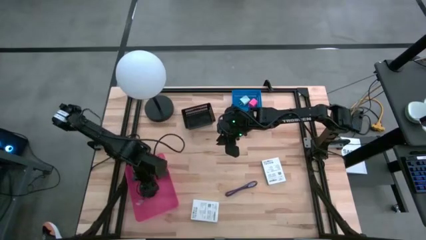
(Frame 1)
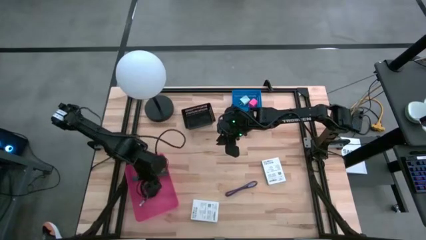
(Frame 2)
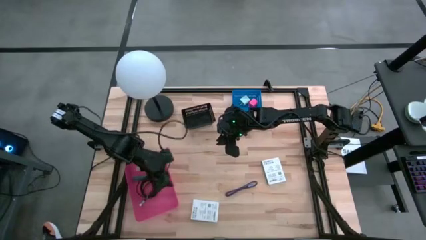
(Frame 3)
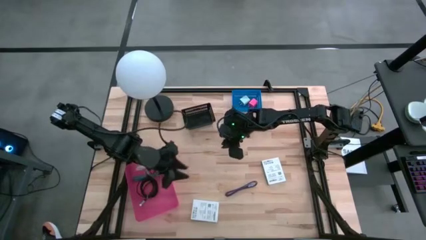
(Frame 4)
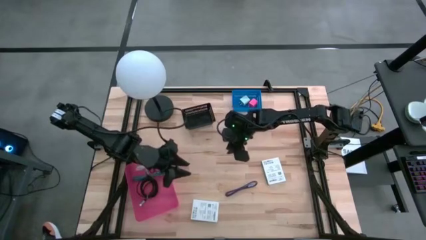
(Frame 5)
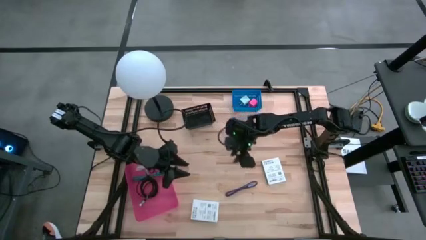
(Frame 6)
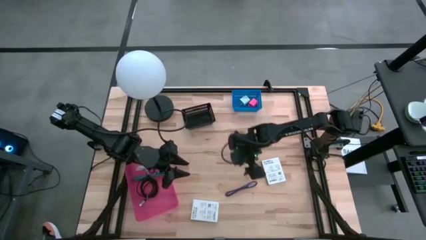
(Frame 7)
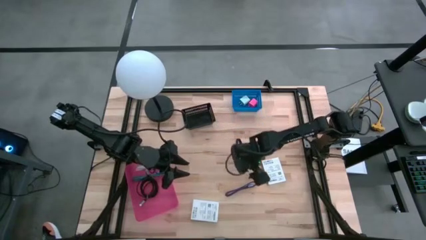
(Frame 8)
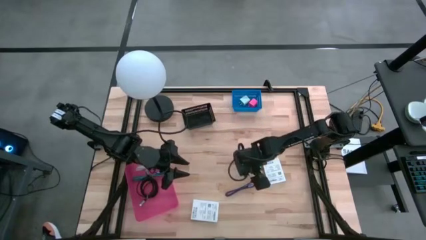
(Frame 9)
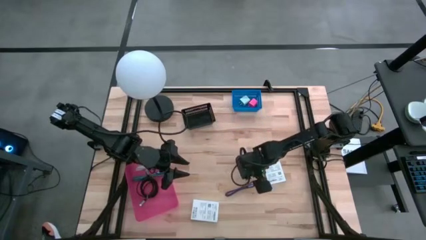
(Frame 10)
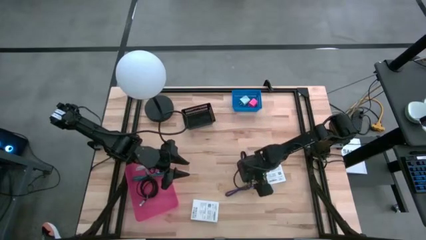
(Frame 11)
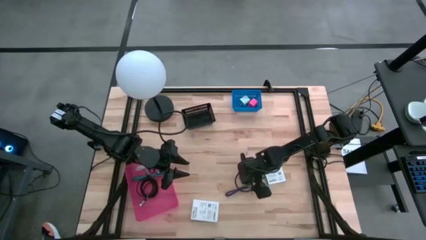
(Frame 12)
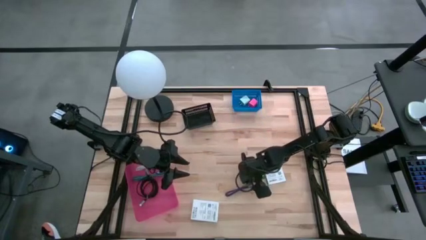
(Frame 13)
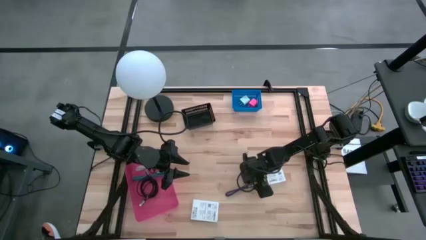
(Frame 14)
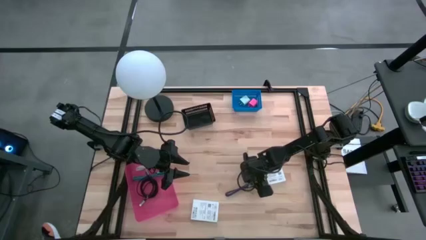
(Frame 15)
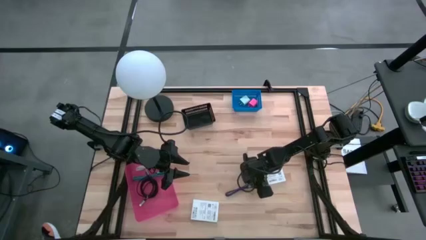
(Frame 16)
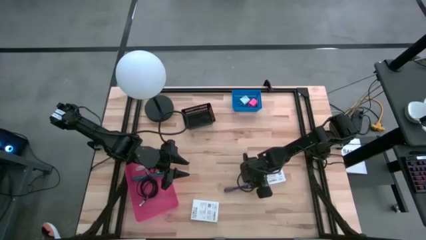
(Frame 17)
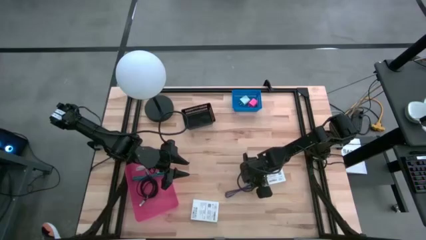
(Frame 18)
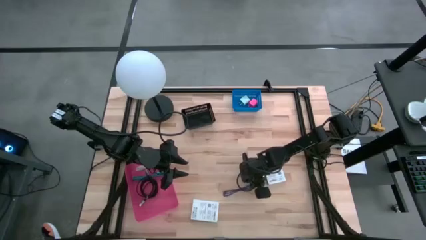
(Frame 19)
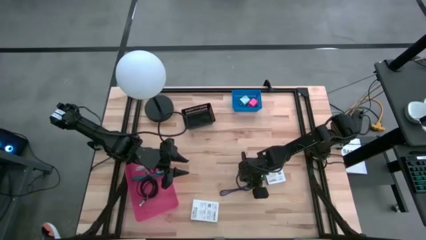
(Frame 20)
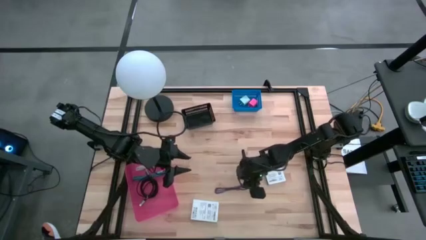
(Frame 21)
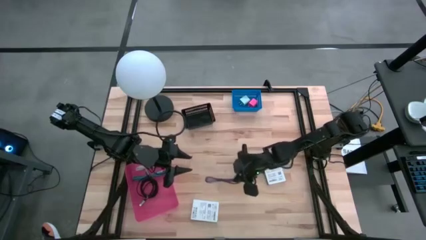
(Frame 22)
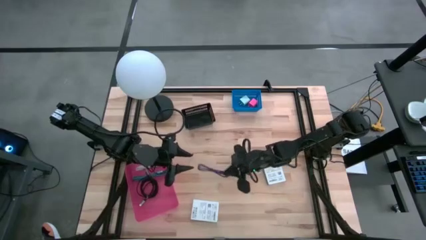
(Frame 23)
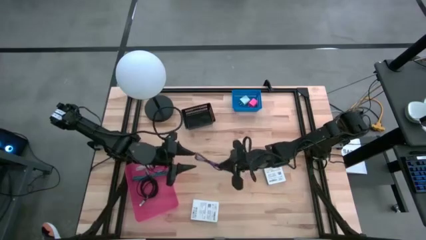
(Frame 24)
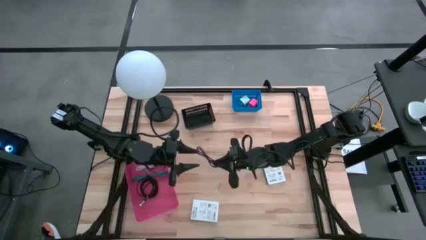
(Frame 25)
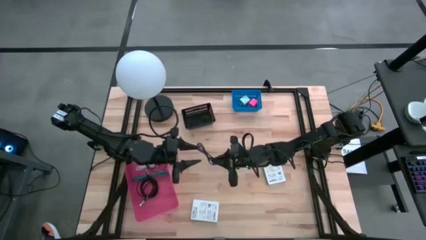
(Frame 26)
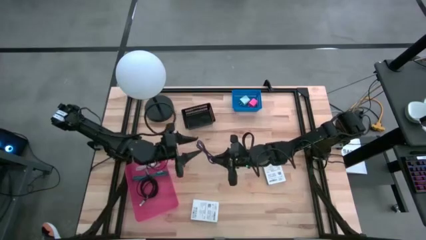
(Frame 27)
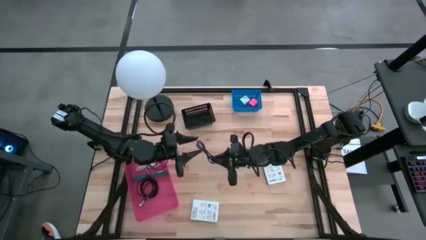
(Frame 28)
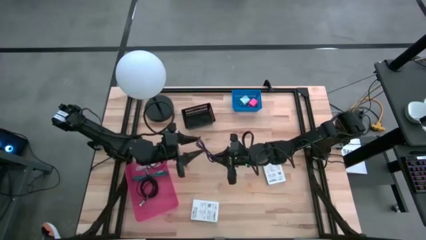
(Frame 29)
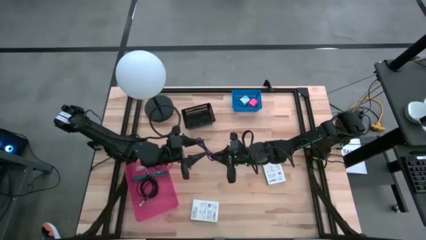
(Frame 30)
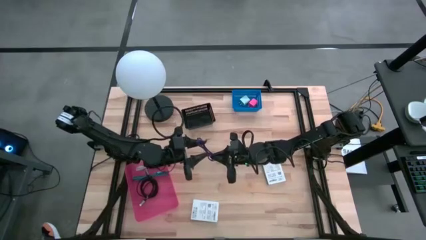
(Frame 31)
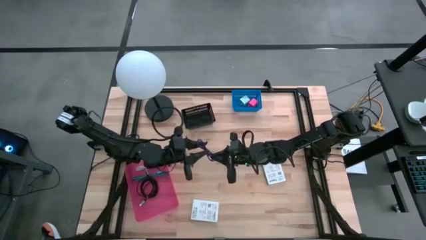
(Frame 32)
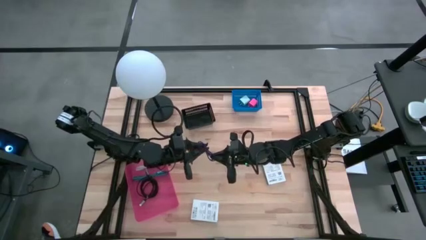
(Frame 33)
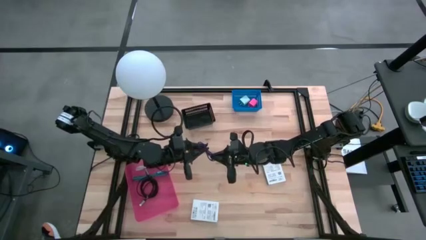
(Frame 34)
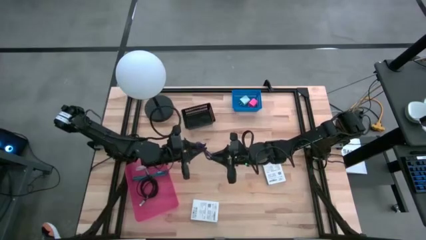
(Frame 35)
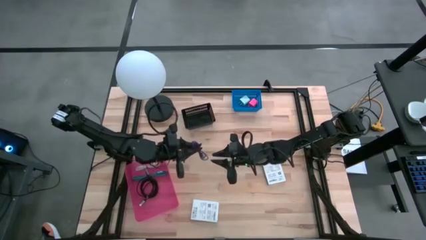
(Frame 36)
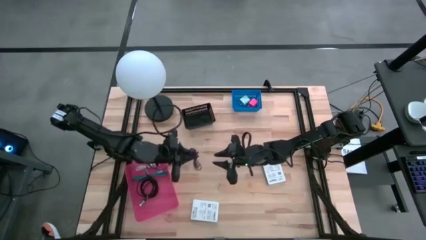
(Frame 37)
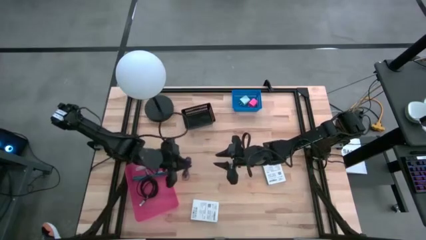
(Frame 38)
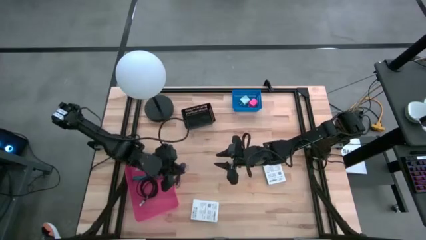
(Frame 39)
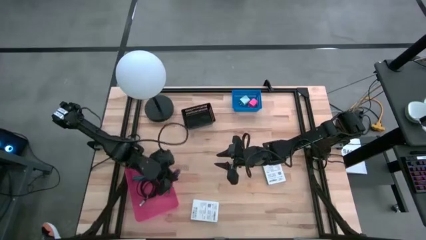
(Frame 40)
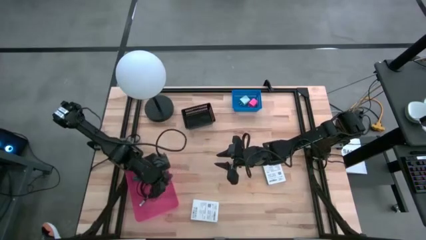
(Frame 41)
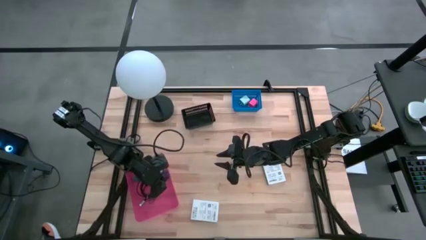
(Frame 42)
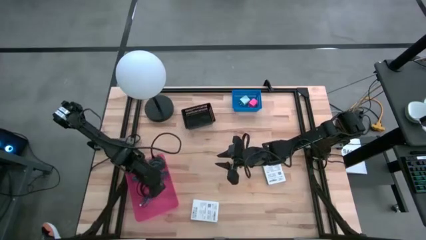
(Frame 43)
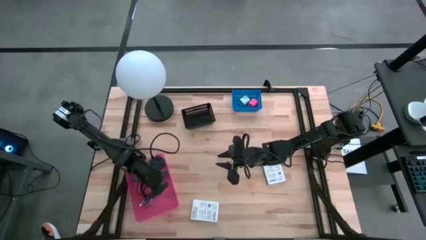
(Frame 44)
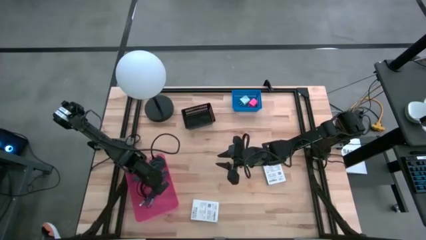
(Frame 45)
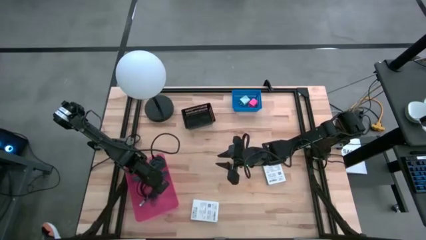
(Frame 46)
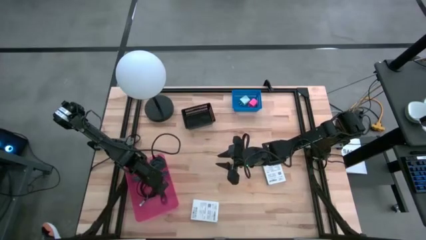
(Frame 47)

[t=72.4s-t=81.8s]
Task: Pick and place items into bin
Put the violet patterned charger cable into the light pink bin
